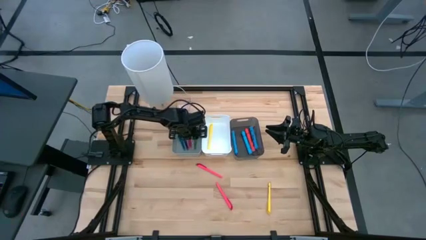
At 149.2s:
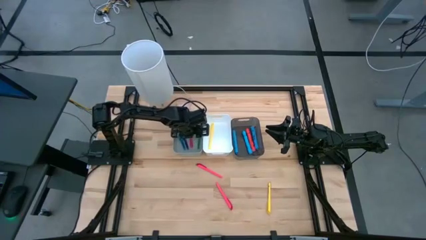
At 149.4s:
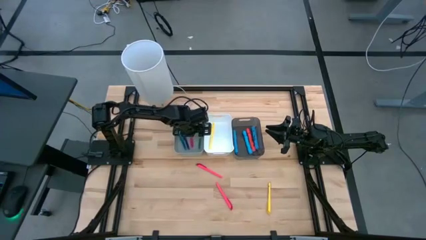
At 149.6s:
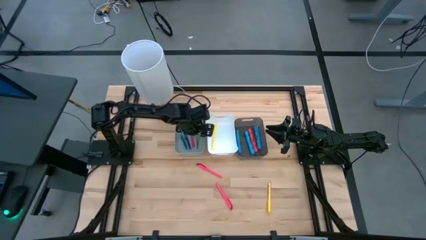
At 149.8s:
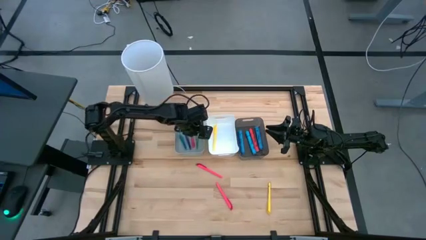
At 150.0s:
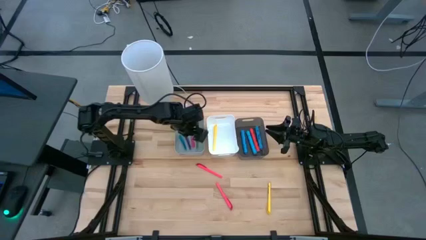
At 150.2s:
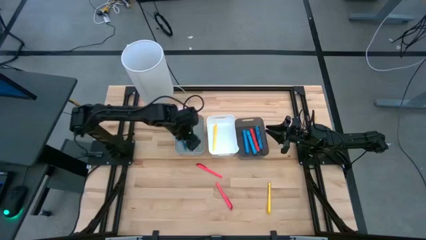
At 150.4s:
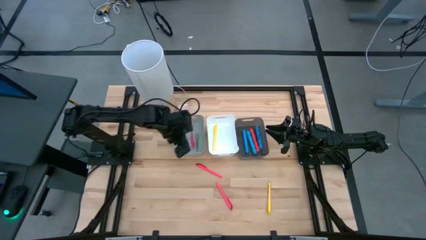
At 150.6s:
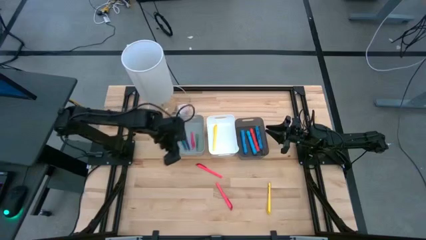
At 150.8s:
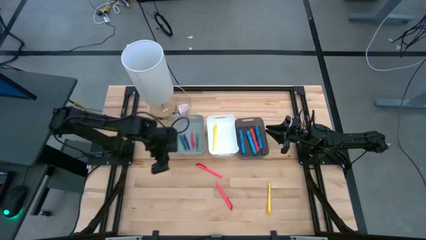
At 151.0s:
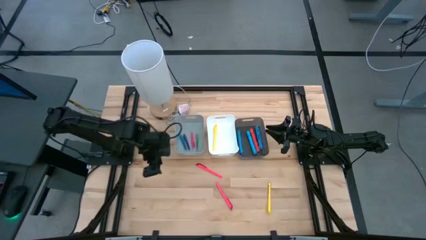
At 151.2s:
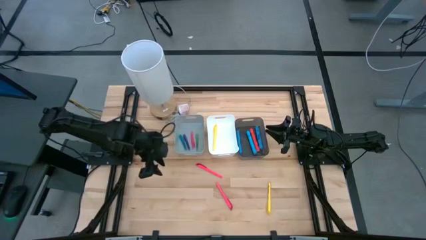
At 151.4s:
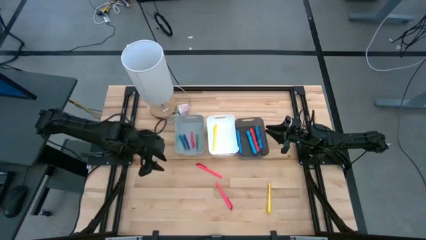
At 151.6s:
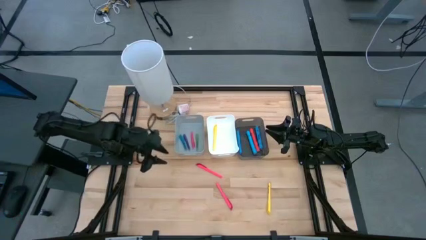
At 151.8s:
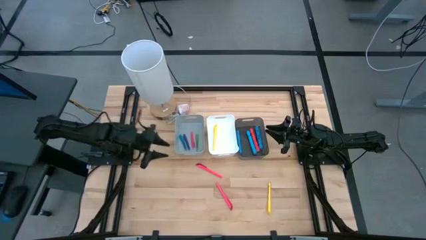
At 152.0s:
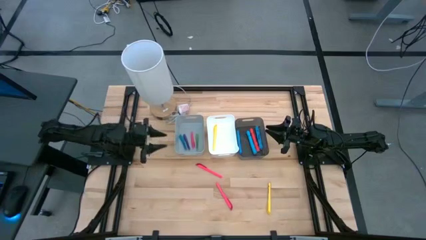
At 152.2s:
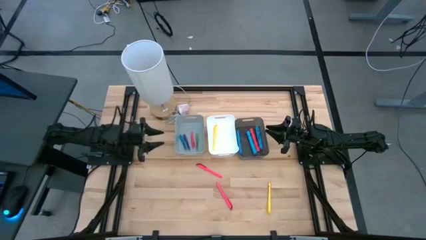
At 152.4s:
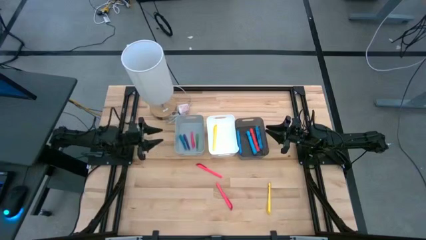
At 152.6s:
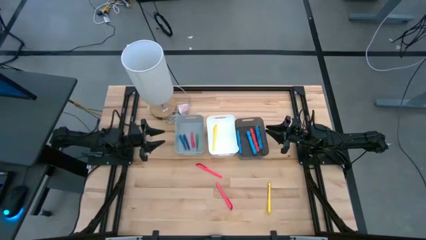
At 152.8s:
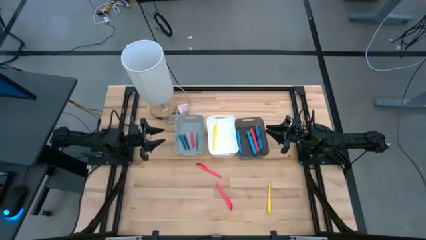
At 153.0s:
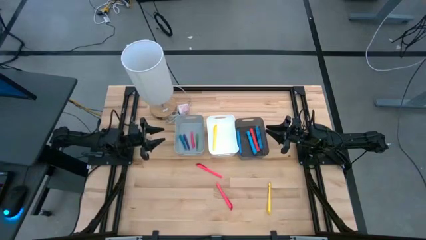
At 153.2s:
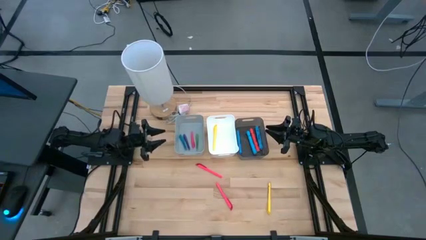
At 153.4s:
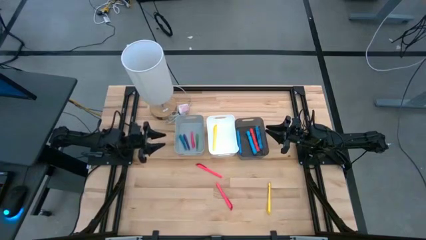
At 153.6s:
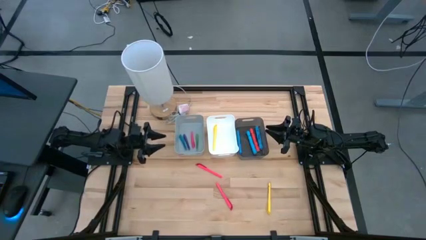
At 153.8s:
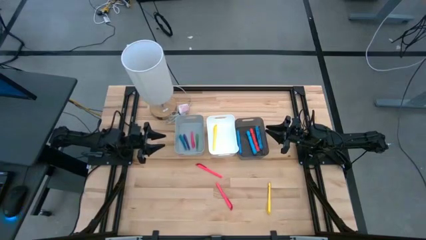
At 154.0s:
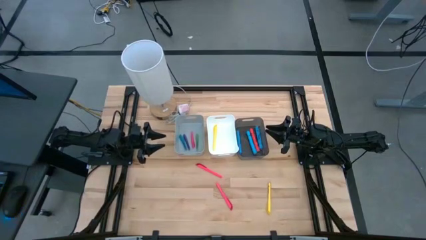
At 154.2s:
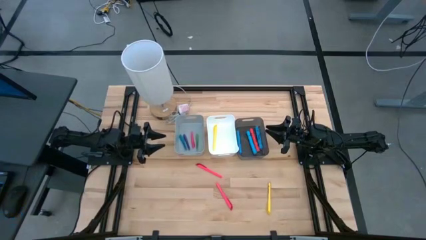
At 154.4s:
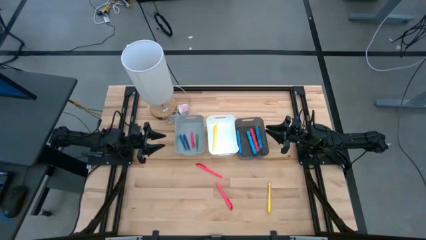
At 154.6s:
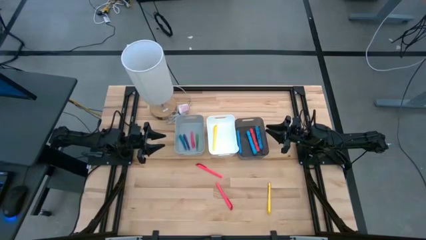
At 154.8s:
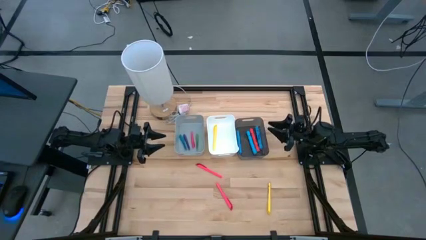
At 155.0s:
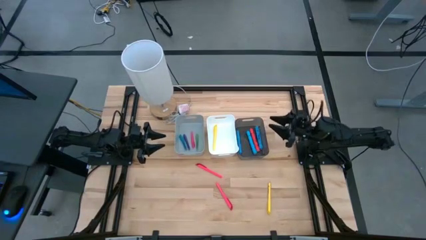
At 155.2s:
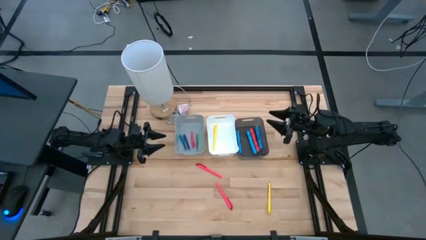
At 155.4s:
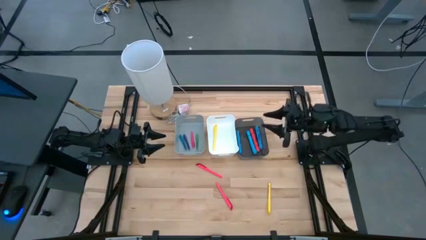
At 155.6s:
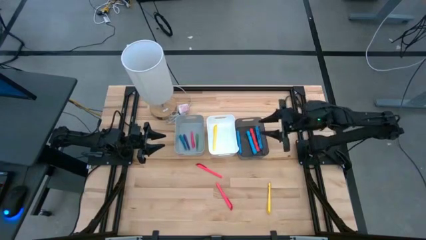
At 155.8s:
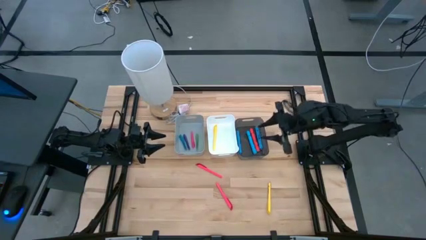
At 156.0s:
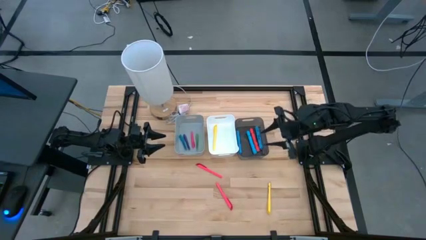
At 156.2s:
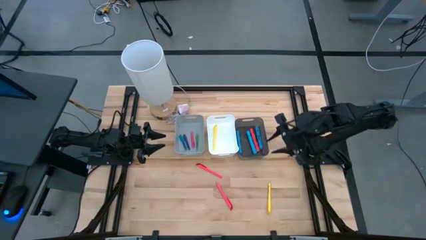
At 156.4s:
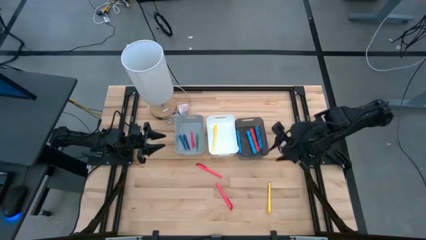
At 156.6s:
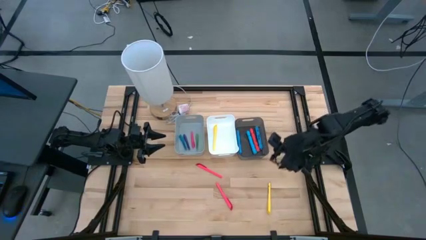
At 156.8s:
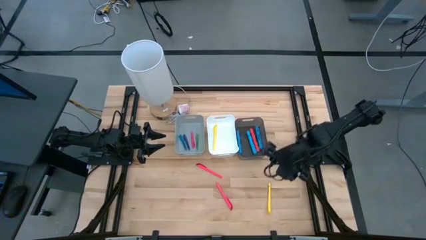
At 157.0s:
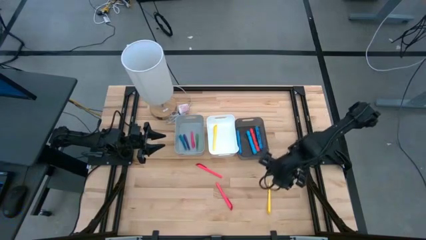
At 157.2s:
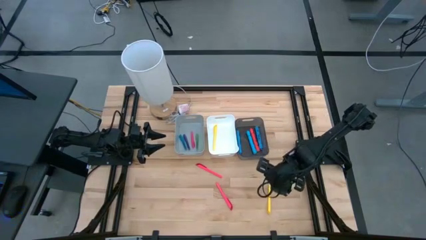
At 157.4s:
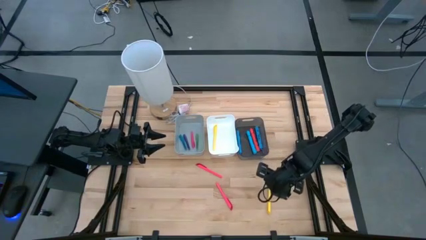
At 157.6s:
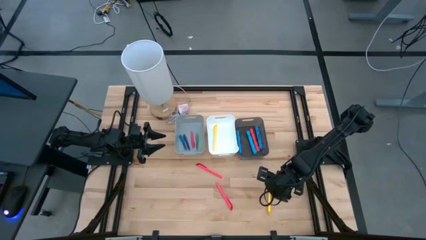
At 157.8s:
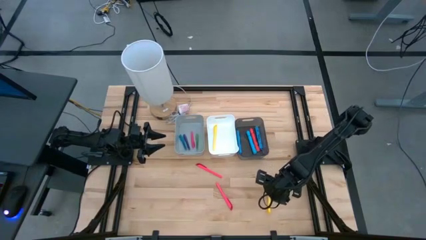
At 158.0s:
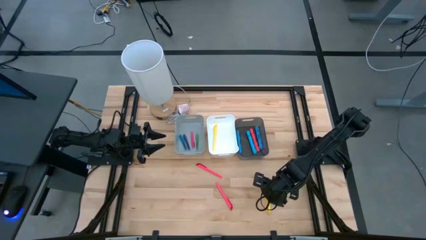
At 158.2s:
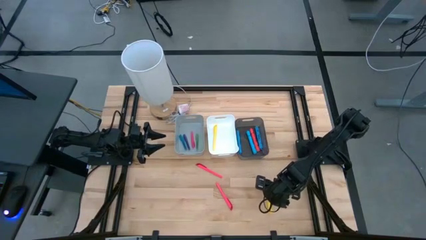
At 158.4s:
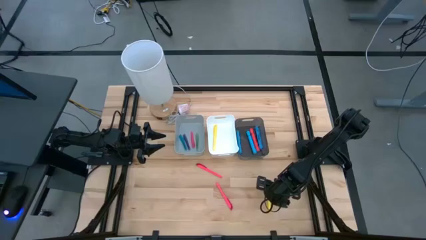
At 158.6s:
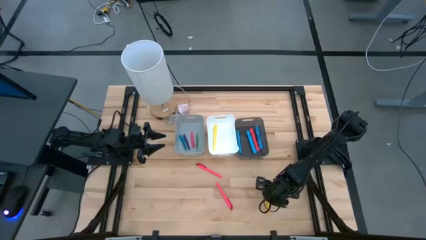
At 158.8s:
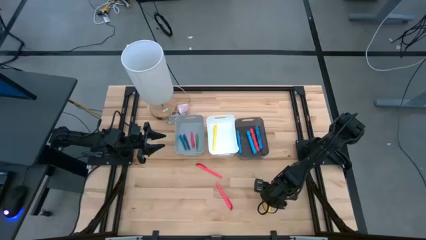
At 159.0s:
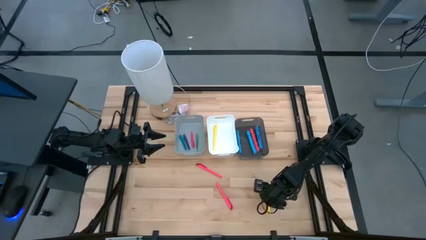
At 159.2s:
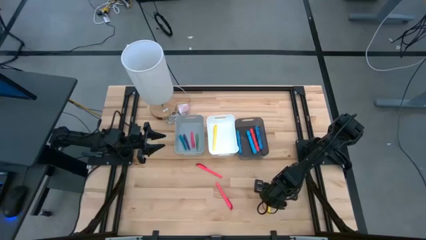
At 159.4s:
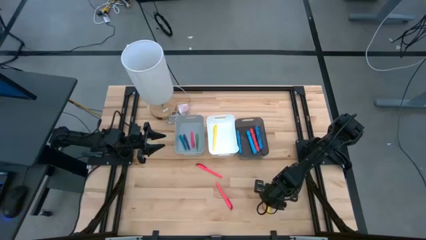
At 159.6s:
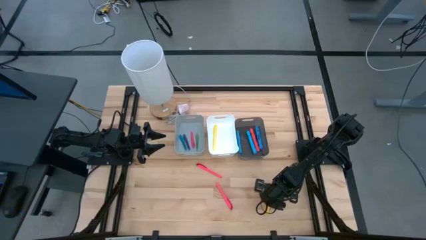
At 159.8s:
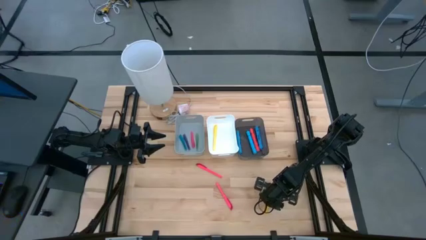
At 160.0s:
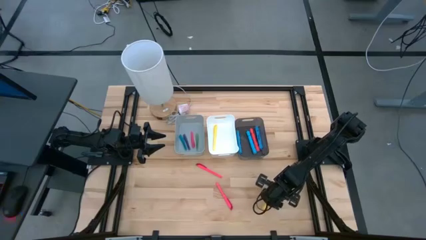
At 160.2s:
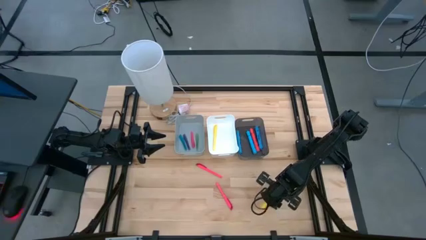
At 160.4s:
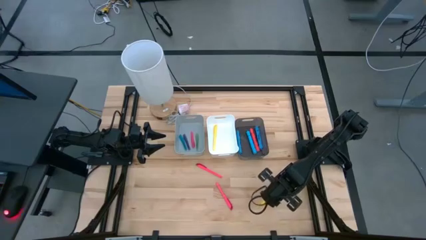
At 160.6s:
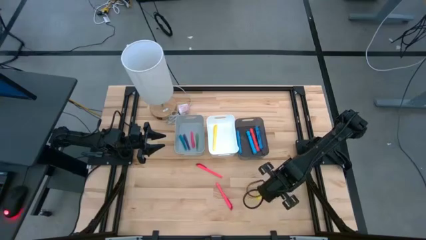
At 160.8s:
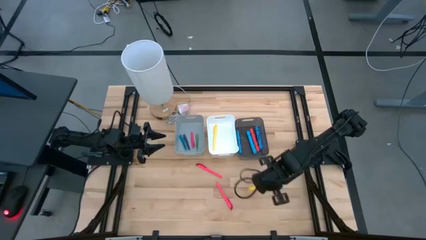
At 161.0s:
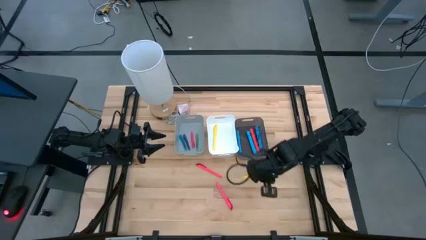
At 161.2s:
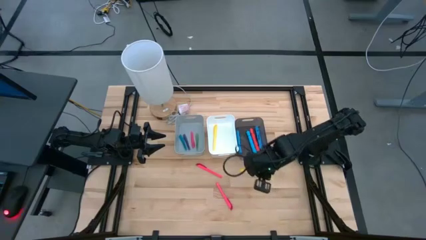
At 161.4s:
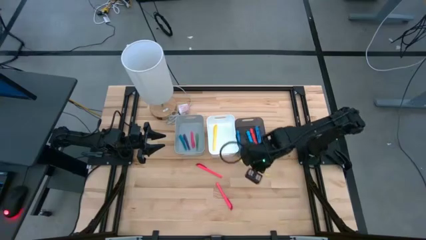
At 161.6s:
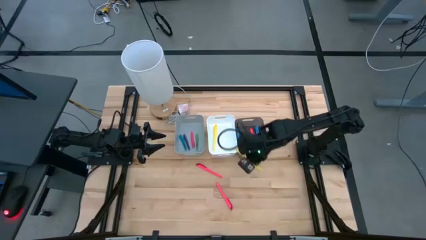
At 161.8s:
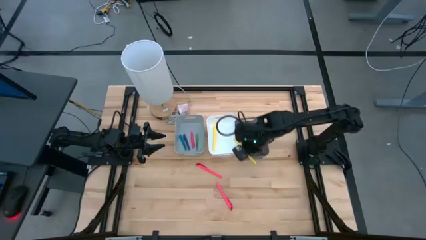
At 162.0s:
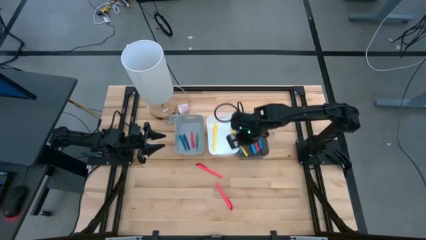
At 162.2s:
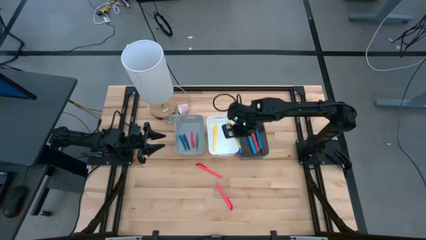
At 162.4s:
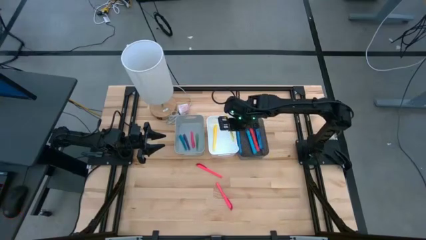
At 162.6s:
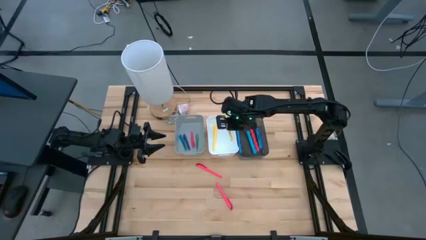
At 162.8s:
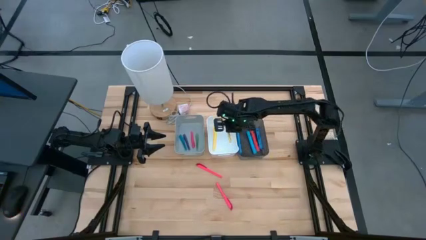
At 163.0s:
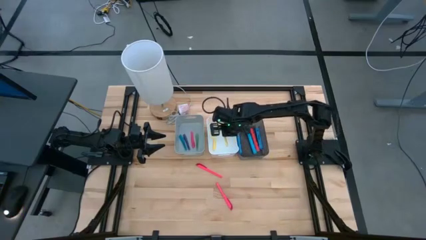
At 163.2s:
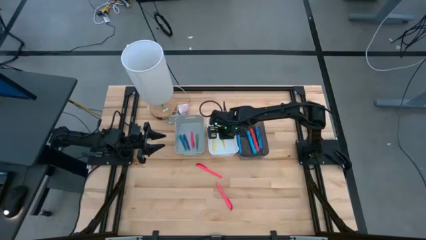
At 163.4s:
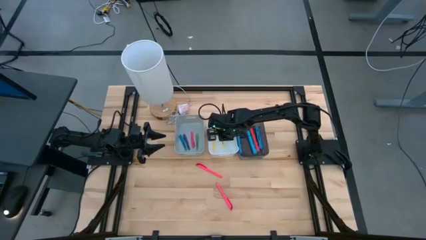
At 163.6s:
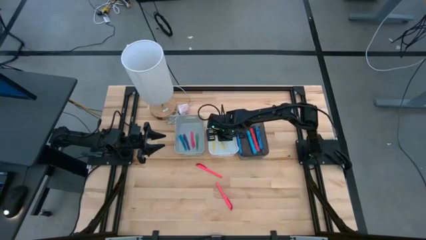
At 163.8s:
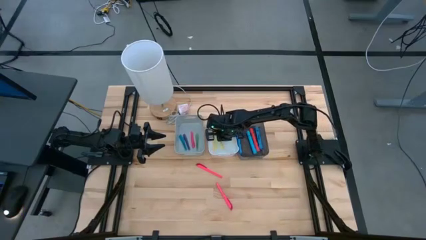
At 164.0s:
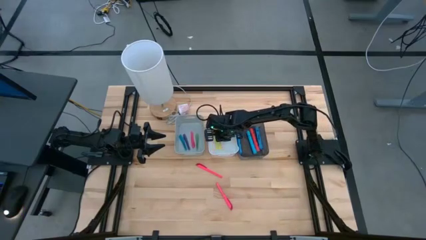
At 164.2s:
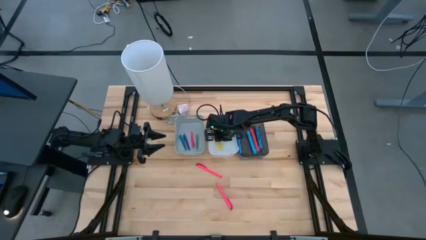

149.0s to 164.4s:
Task: Pick & Place Markers
Put the yellow highlighter pen into the white bin

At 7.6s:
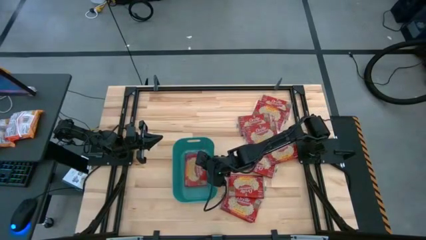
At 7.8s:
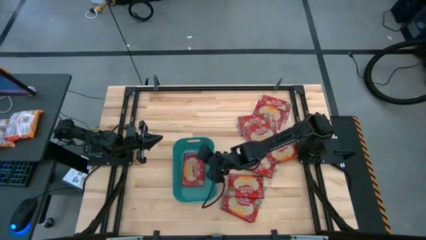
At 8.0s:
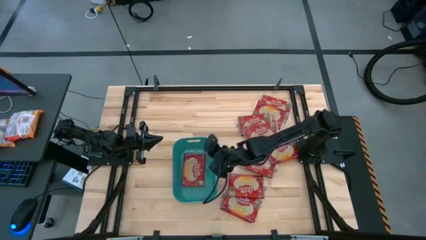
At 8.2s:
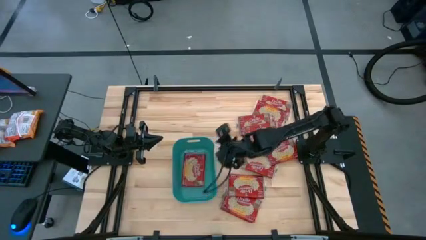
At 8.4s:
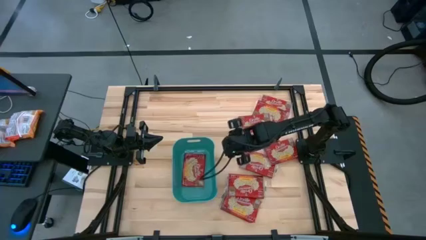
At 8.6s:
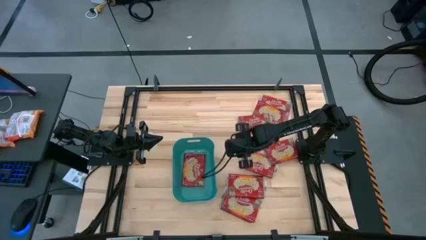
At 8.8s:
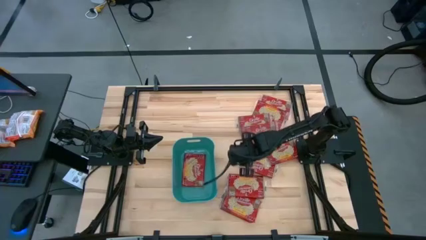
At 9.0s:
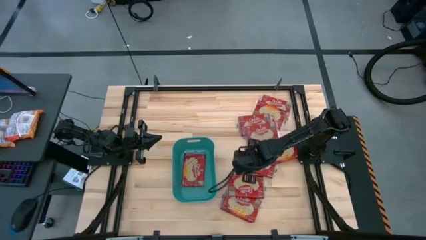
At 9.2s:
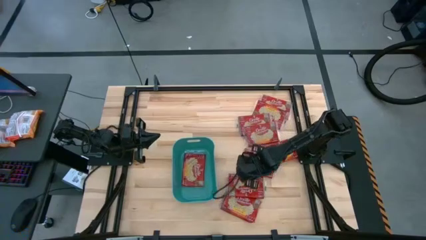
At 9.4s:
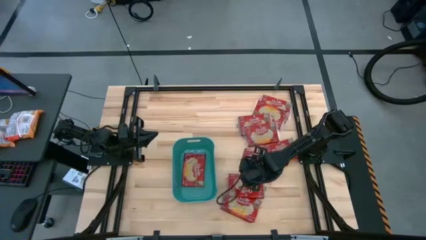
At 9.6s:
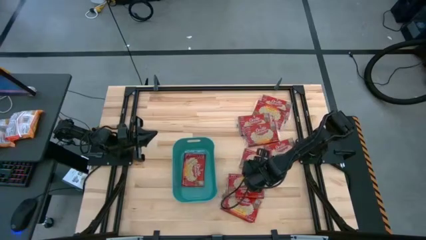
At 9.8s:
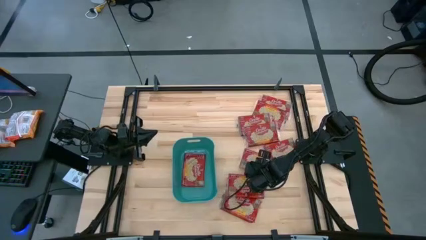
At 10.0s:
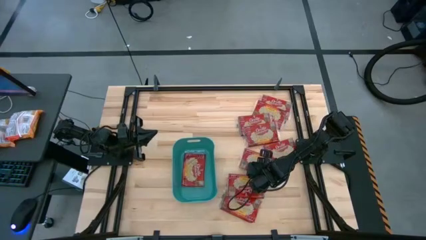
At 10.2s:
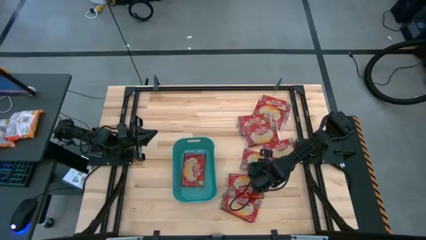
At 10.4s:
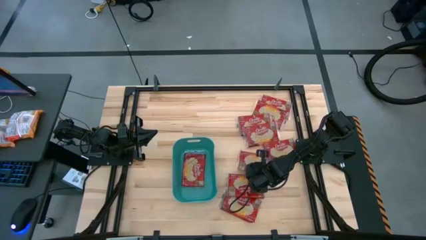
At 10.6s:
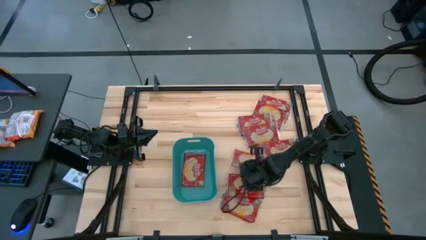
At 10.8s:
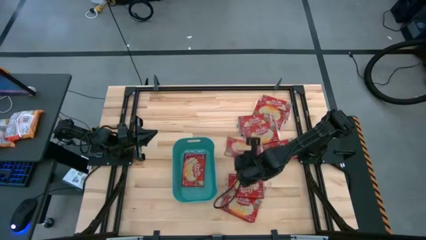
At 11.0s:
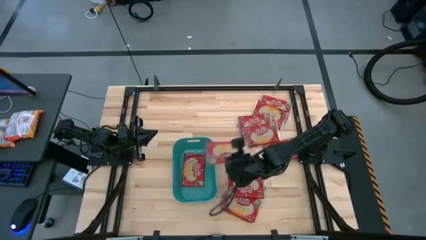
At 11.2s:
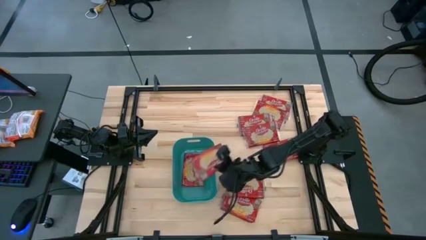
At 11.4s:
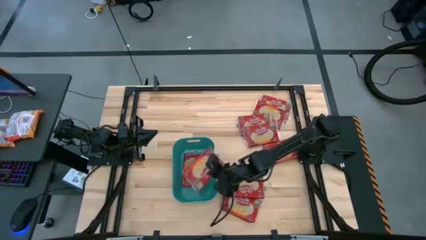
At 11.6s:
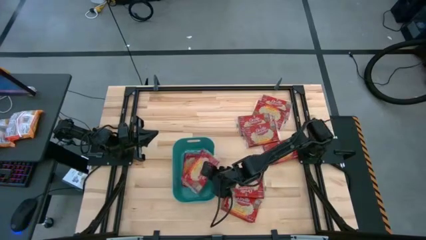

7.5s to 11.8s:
Task: Sort popcorn bags into baskets
Put the red popcorn bag into the green bin
